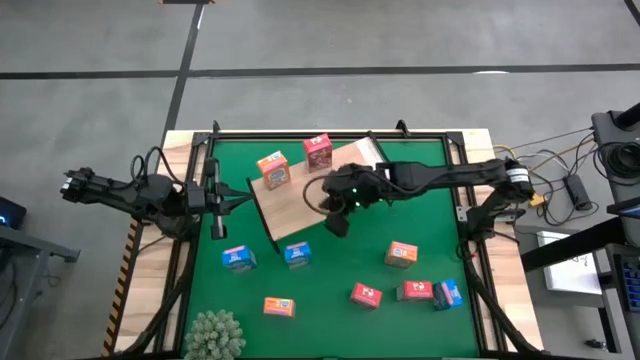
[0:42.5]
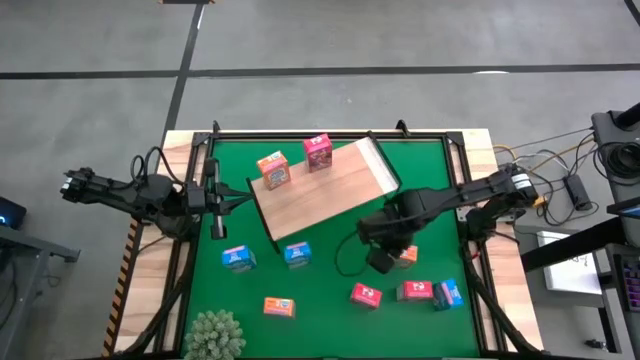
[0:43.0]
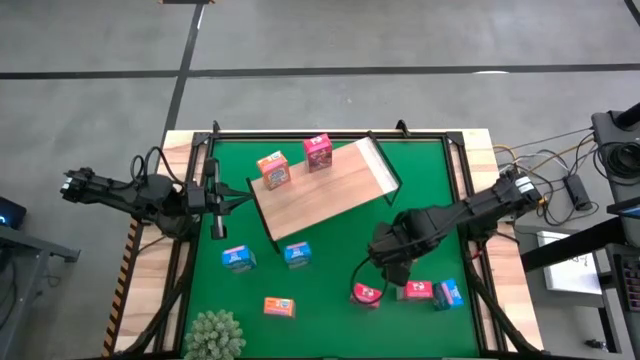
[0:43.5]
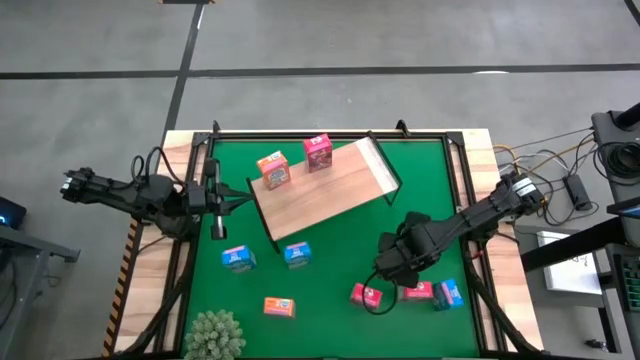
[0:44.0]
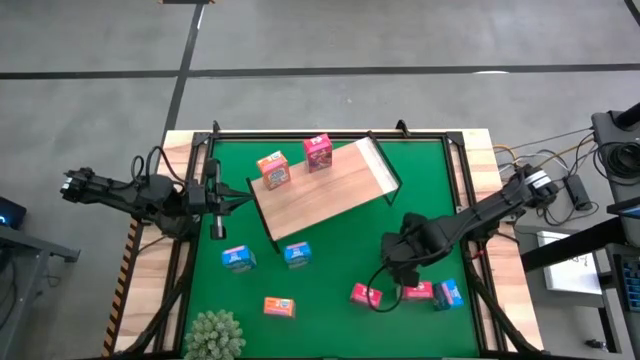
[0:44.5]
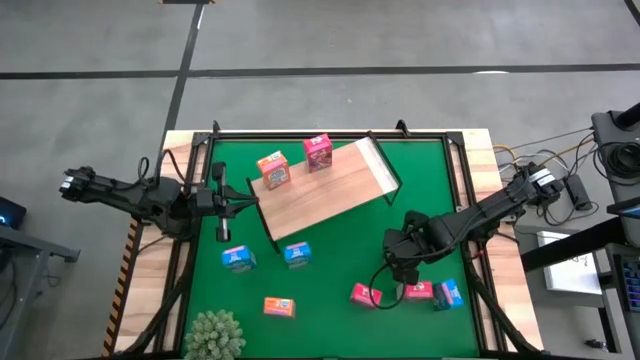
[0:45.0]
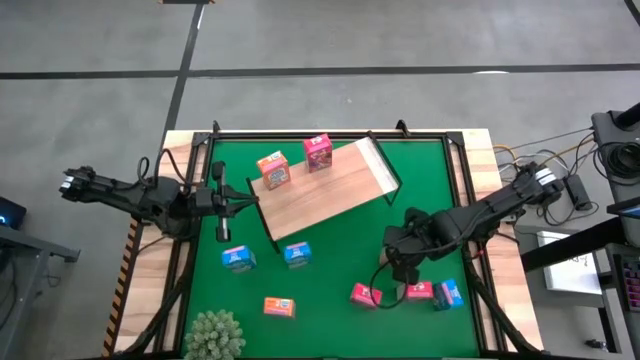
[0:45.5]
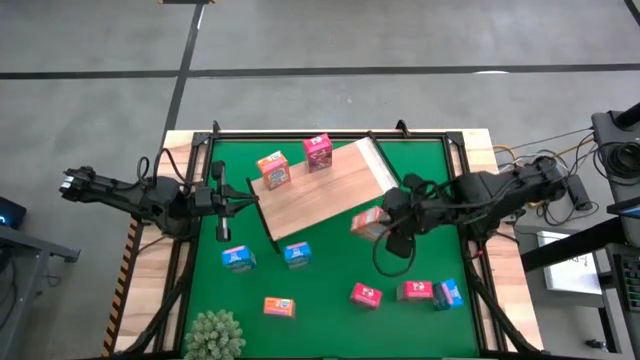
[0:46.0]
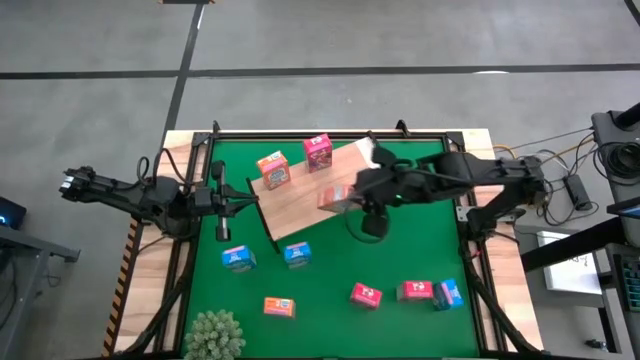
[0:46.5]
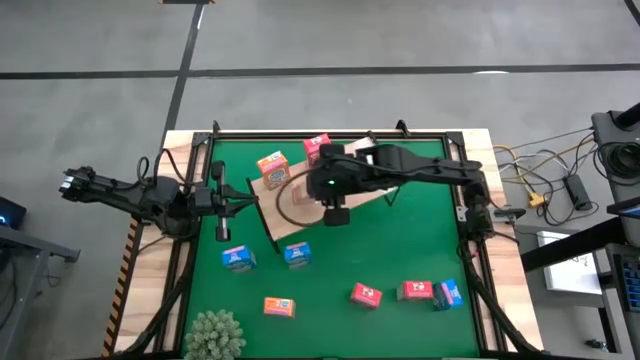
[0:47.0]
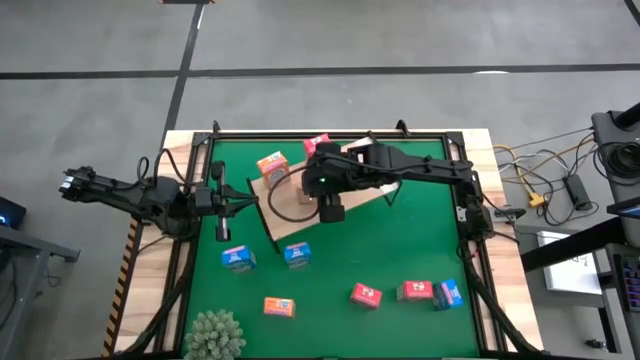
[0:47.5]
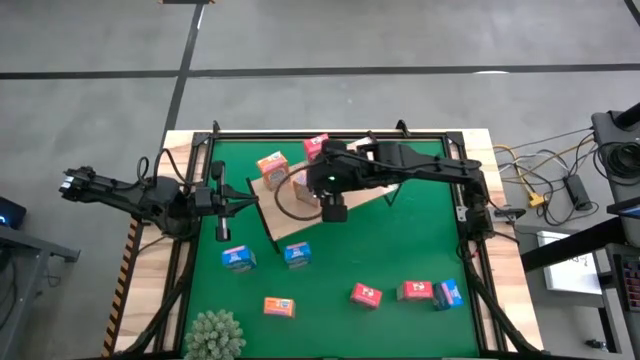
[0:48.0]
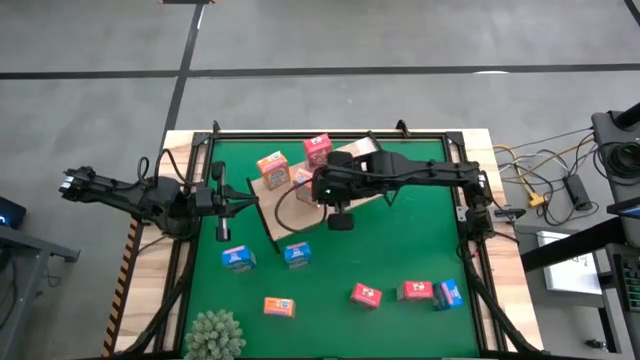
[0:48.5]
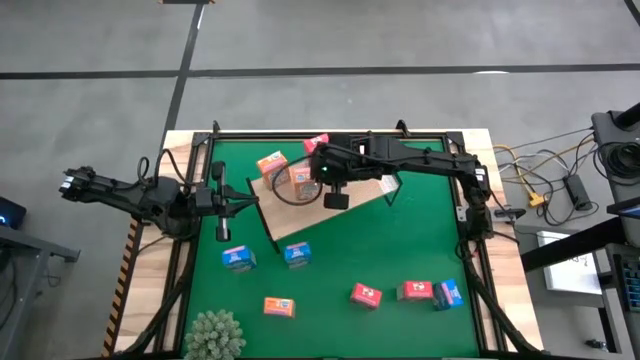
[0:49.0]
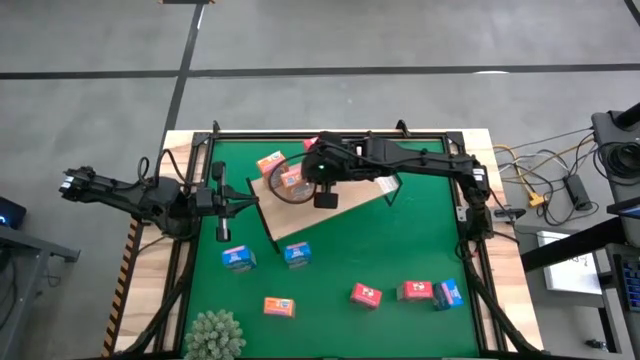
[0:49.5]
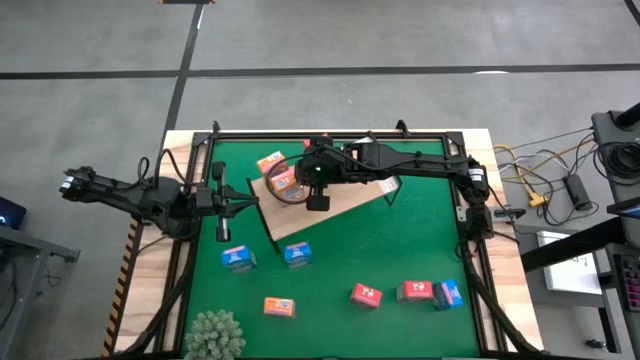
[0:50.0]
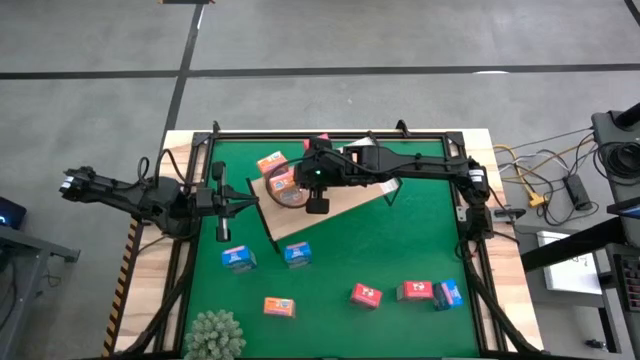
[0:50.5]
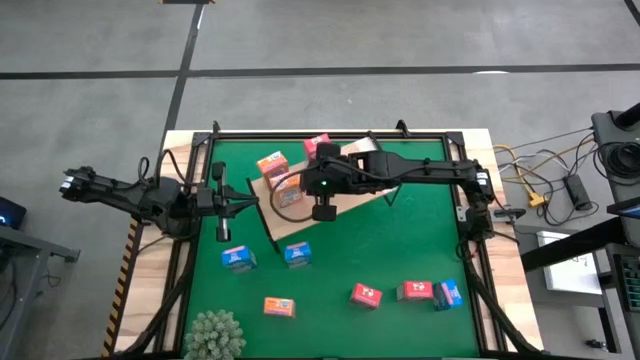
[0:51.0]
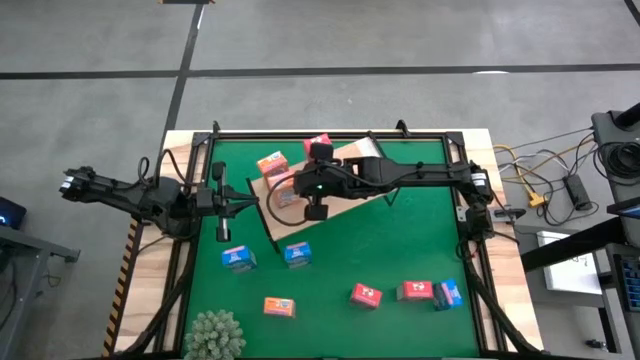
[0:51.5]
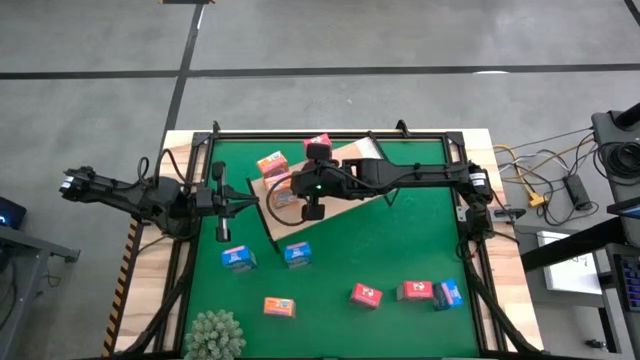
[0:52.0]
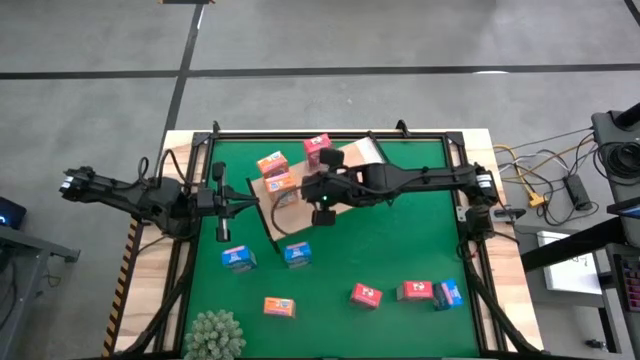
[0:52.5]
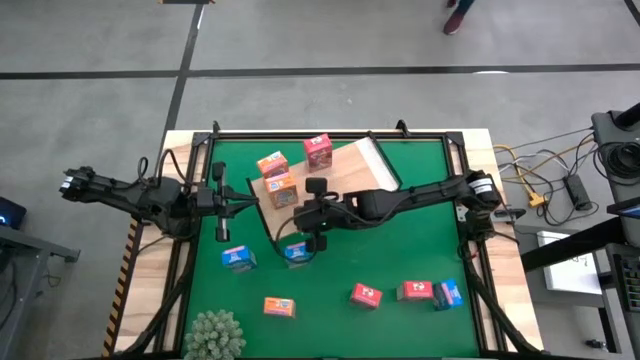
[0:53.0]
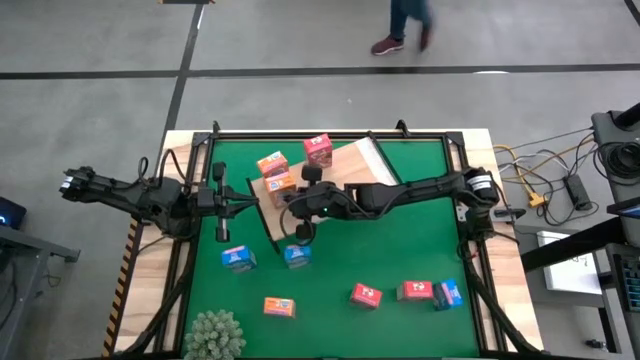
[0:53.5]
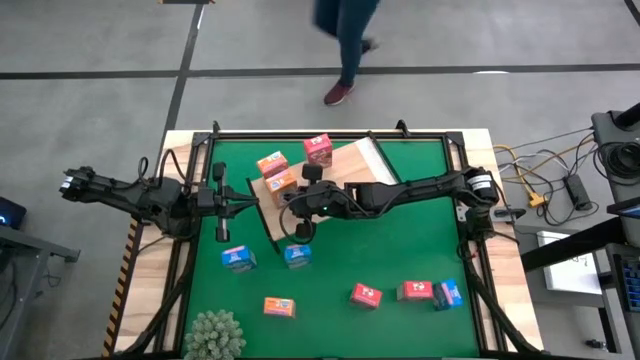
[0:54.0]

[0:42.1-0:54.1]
Task: Stack cereal on shelf
Put the right orange cereal box on the shelf aligned with the other orange cereal box

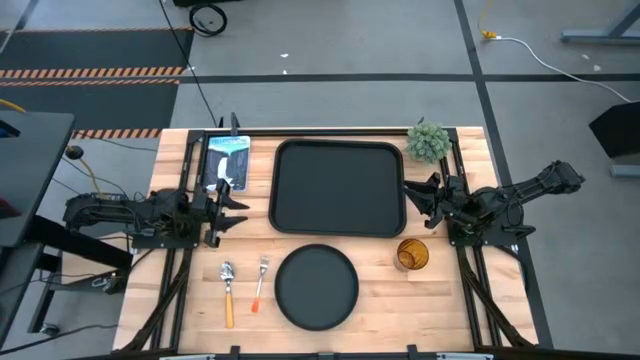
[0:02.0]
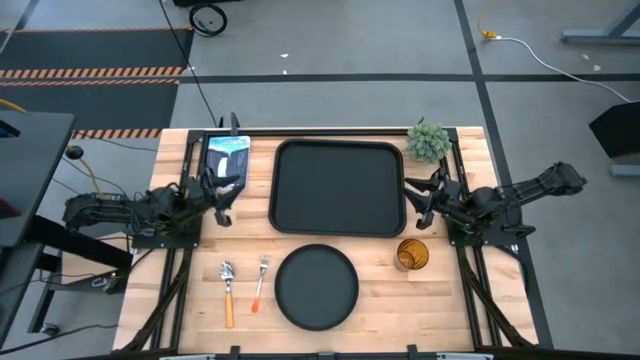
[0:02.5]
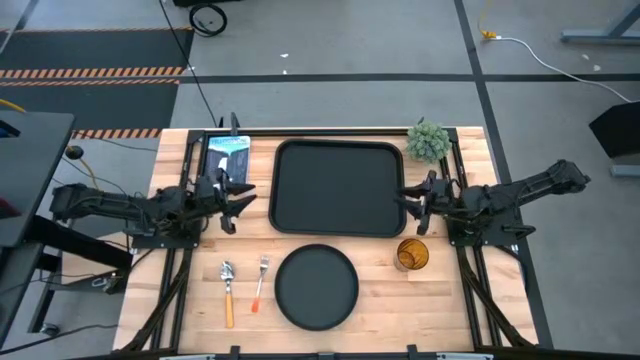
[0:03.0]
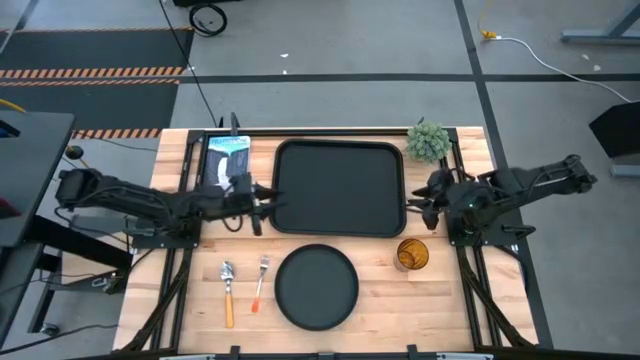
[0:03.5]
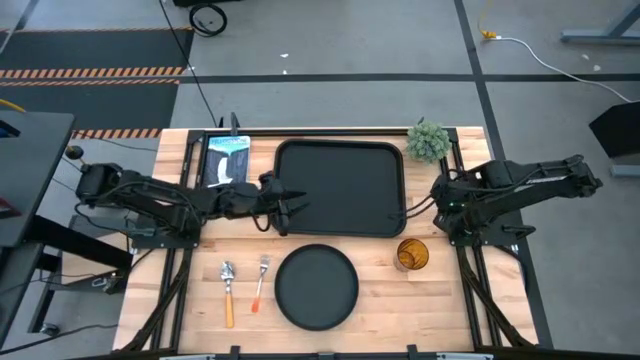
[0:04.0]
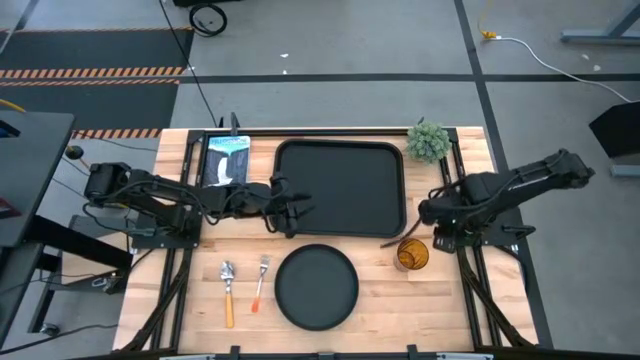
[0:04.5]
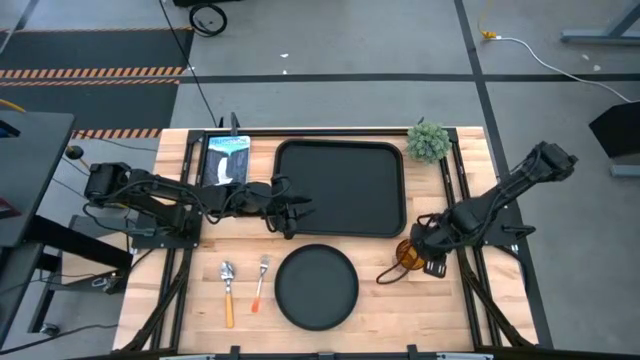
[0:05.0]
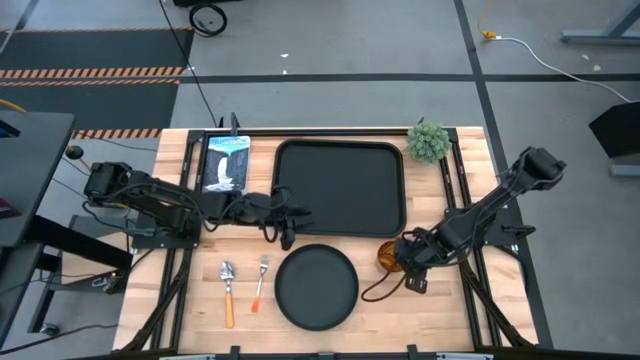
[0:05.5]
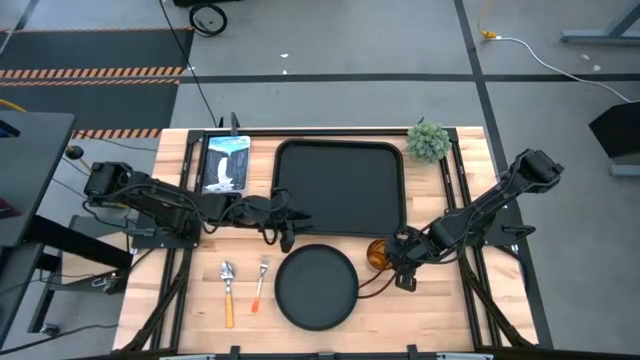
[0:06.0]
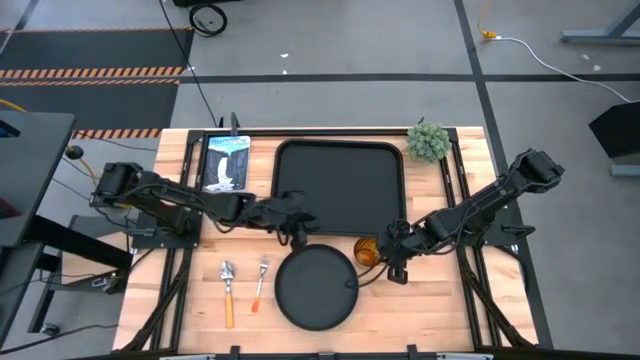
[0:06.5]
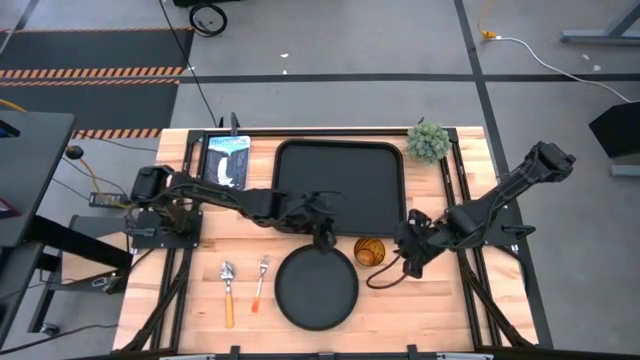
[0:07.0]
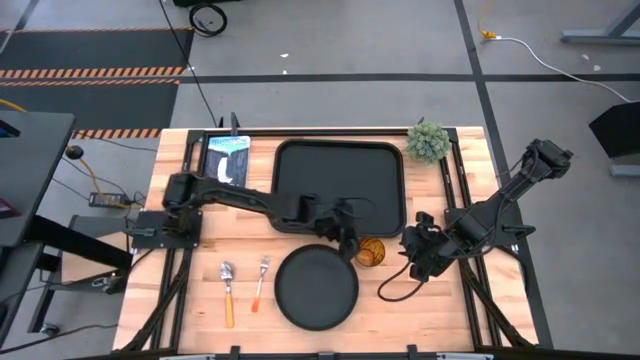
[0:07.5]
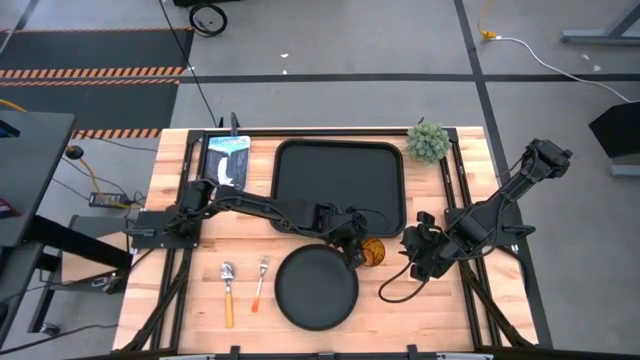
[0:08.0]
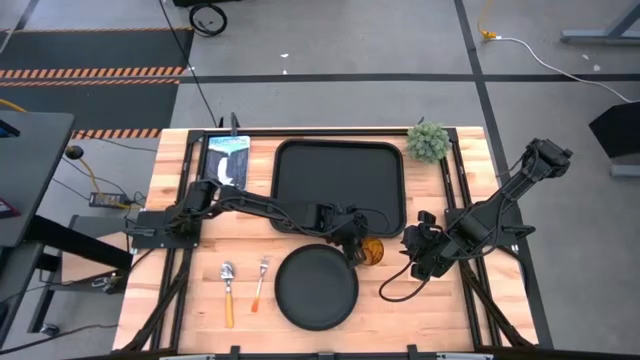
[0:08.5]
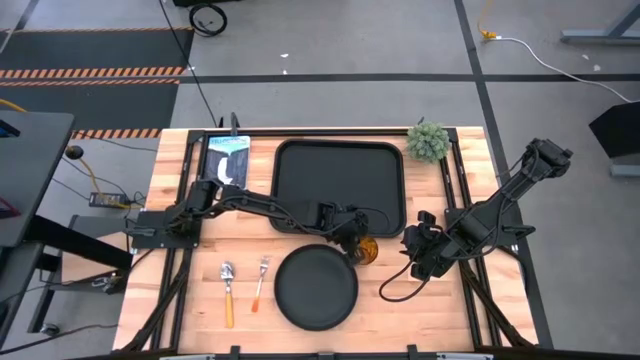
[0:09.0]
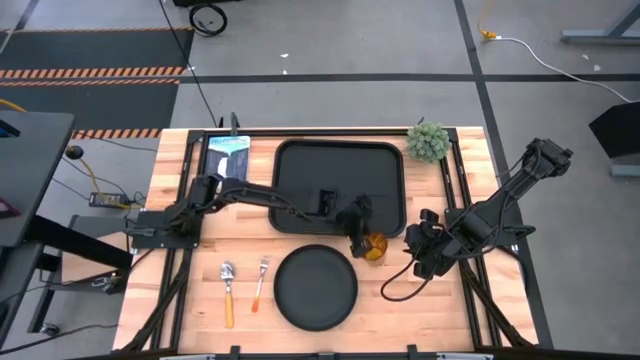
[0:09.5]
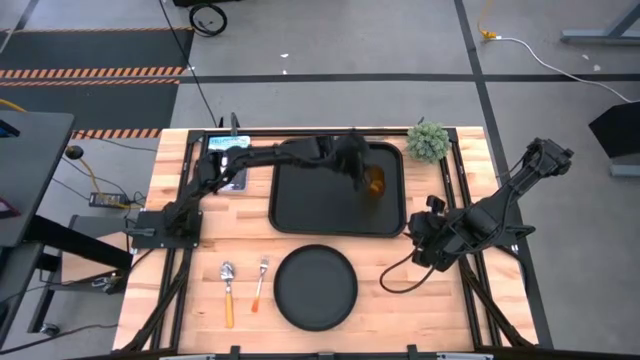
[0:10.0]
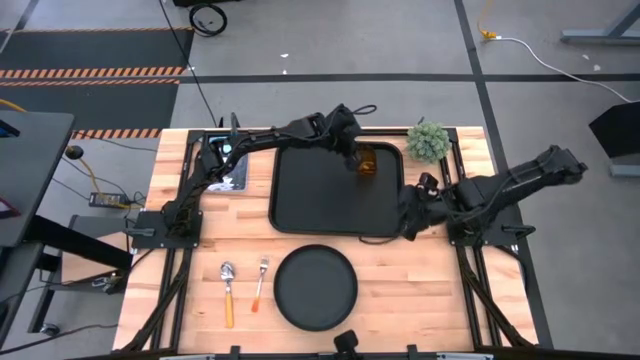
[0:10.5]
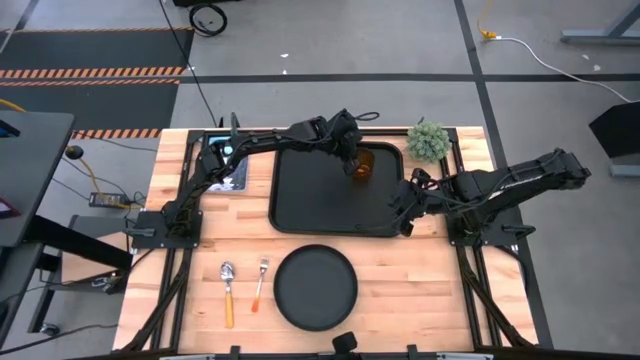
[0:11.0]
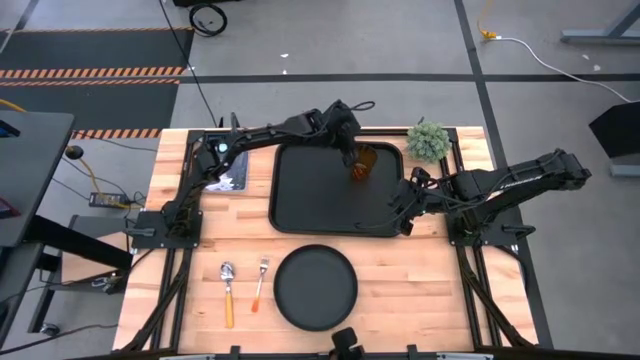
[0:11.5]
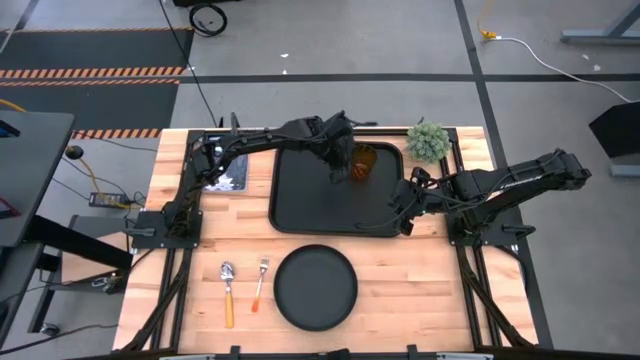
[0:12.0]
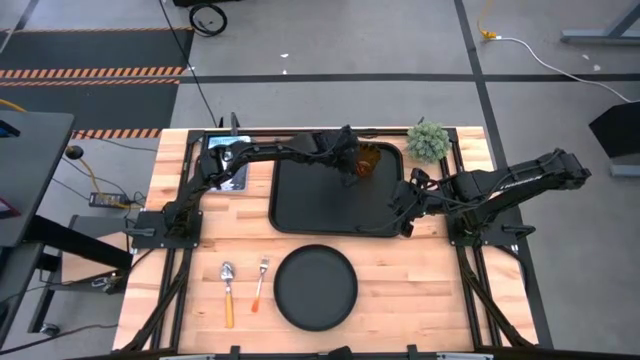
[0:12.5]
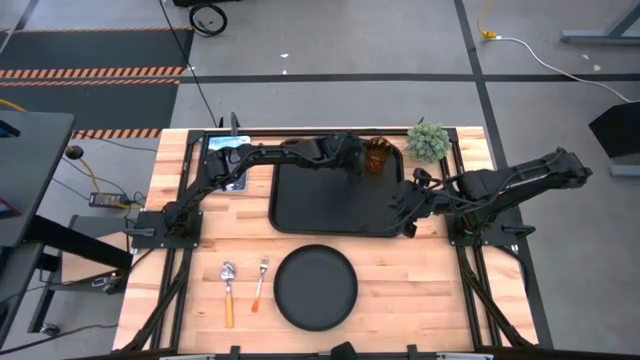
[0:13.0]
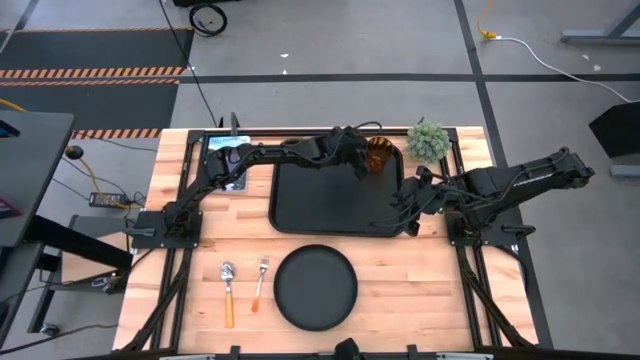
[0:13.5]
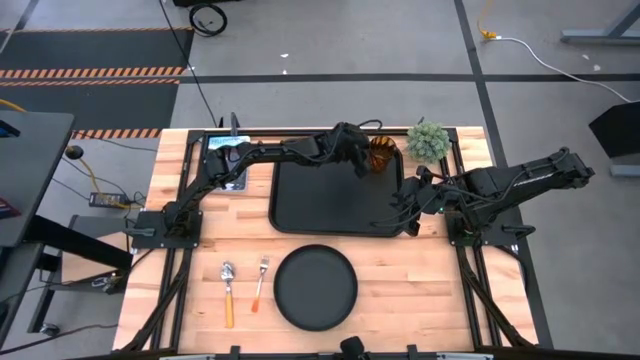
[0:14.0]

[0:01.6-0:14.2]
Task: Pick and place plate/cup/fork/spoon on tray
Put the orange cup on the black tray
